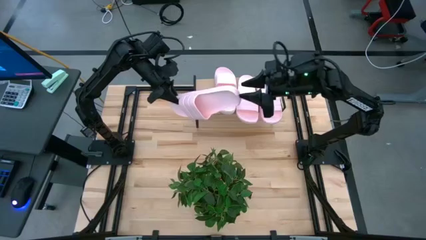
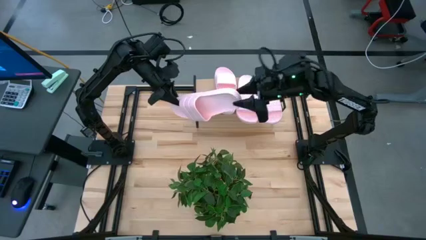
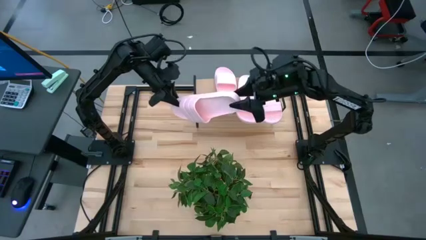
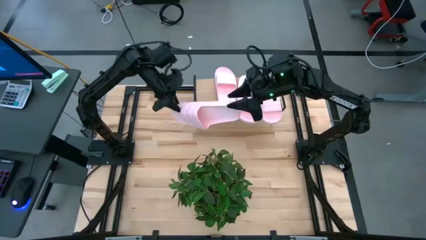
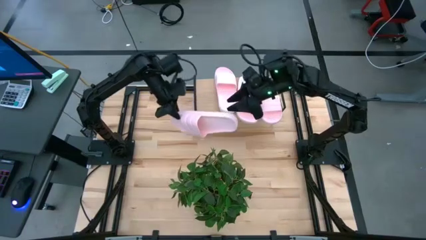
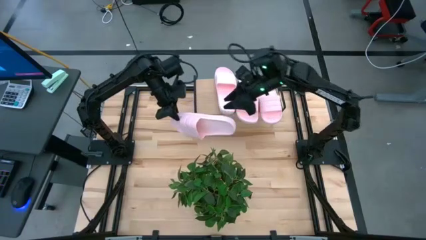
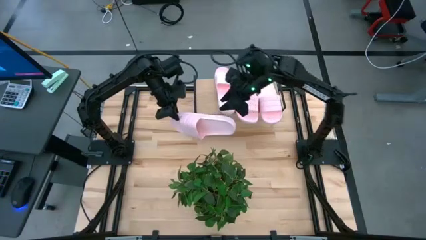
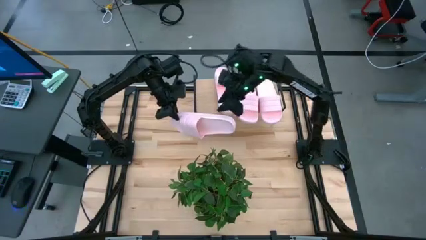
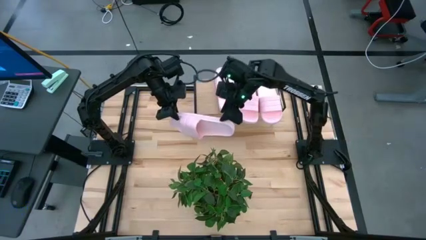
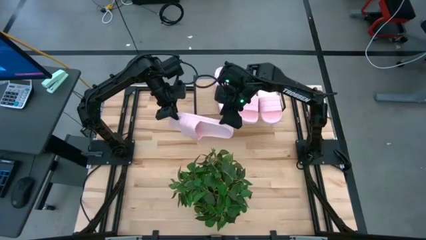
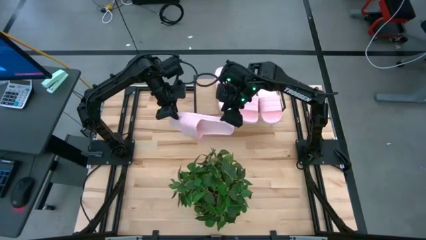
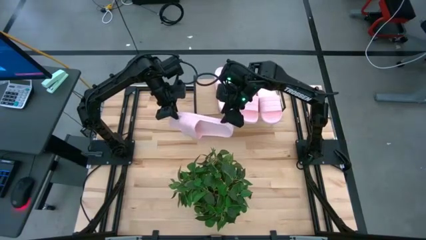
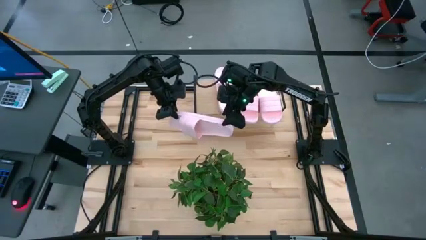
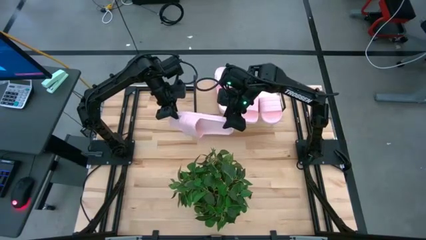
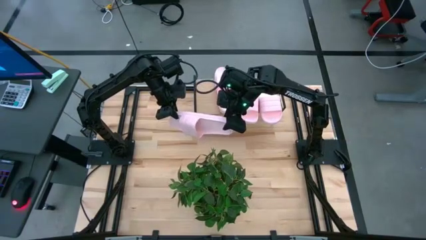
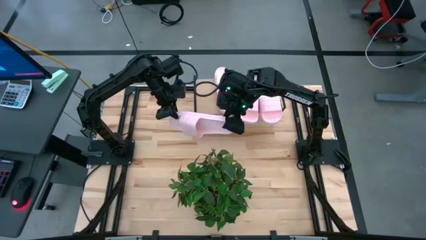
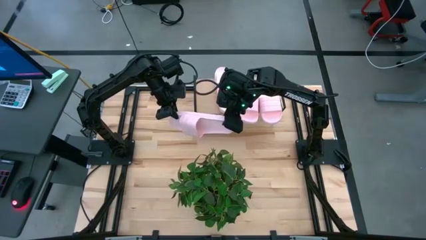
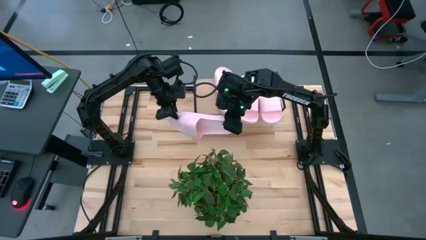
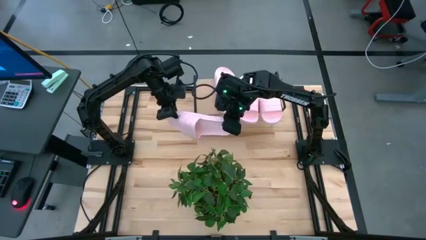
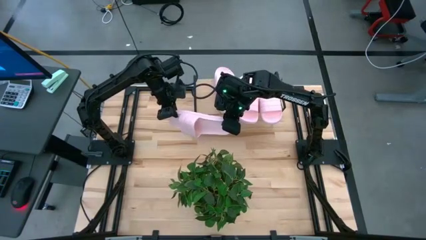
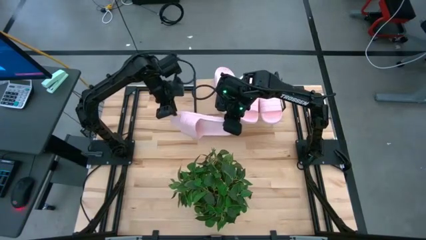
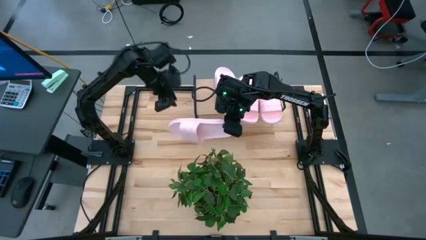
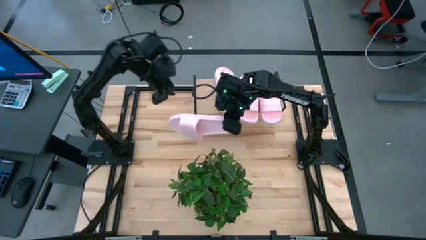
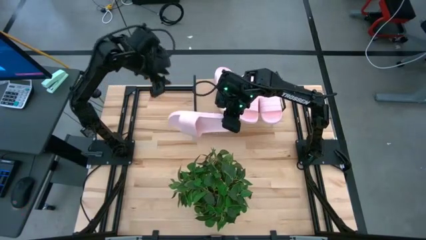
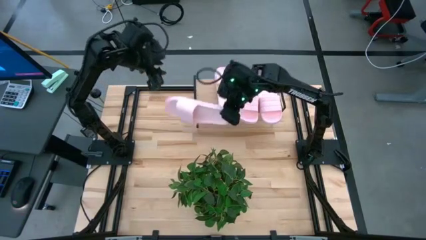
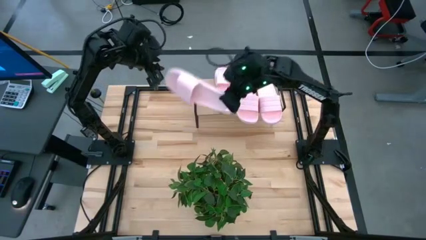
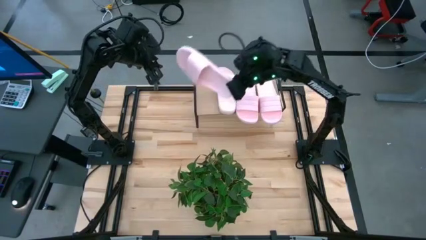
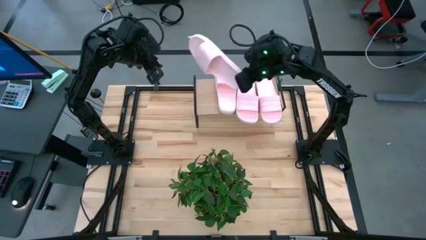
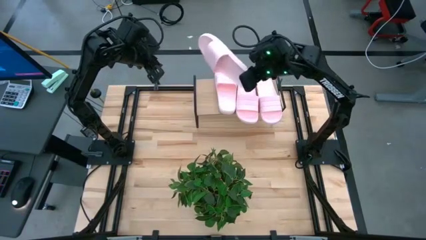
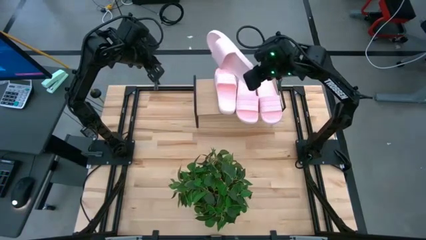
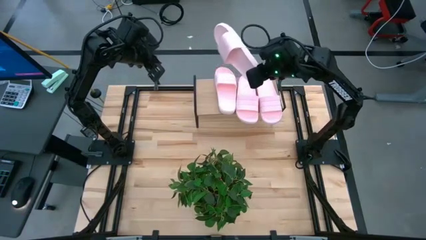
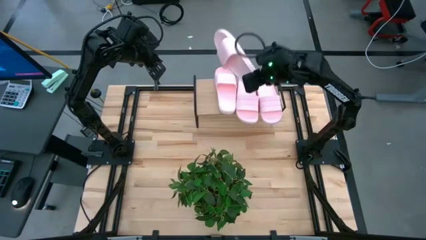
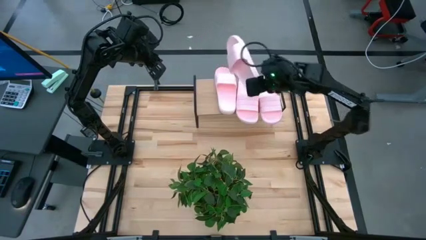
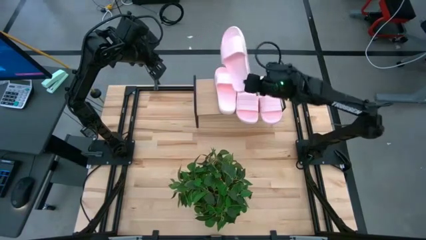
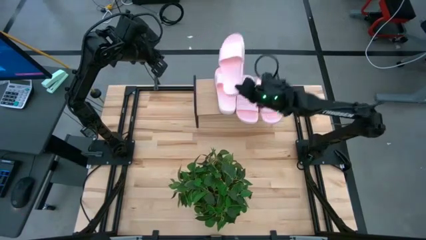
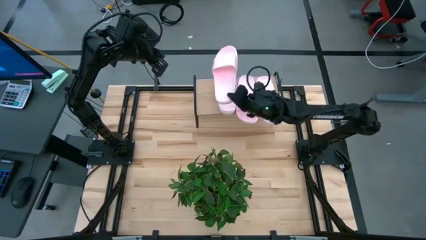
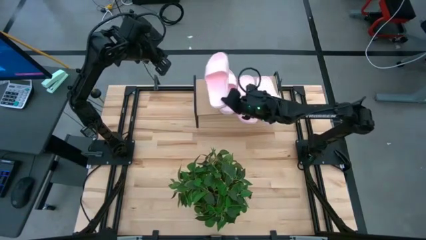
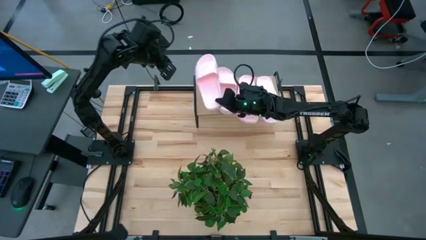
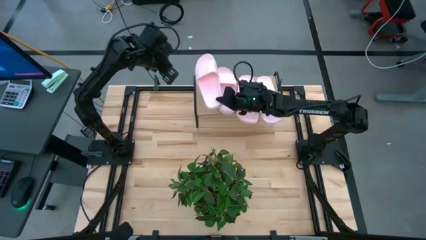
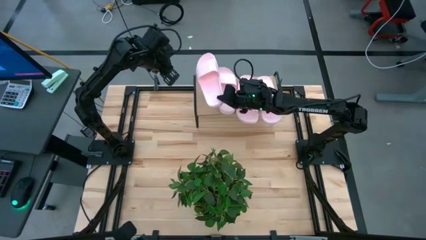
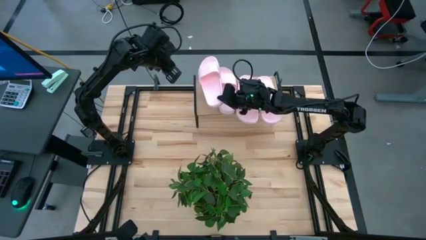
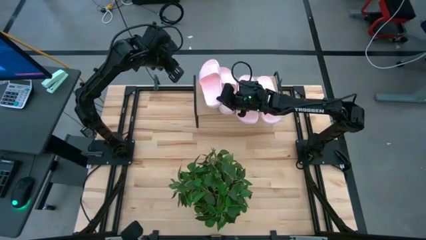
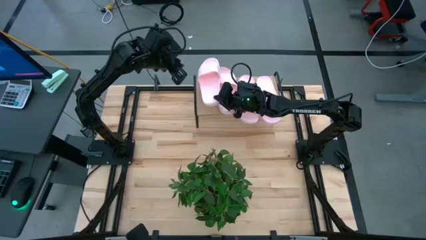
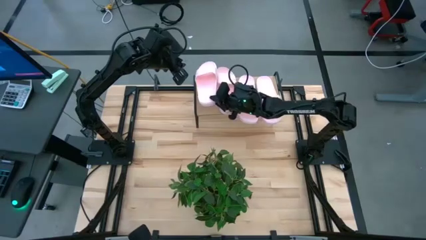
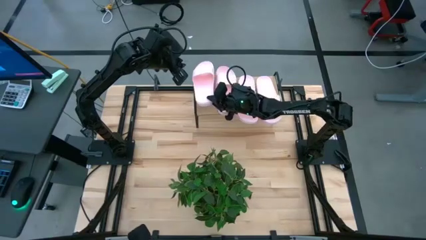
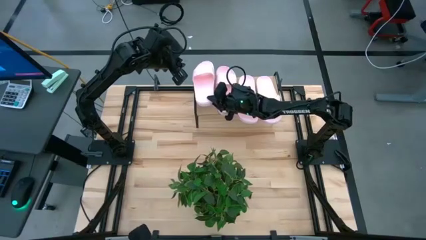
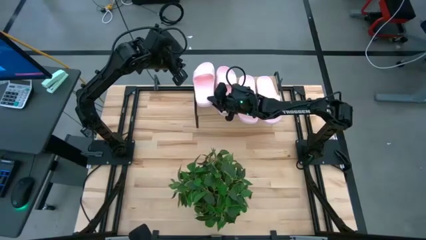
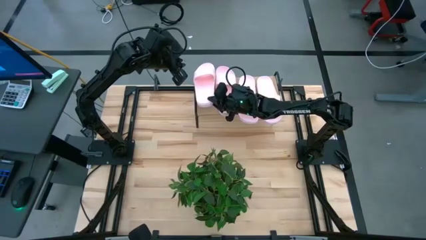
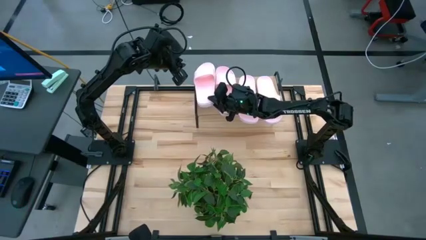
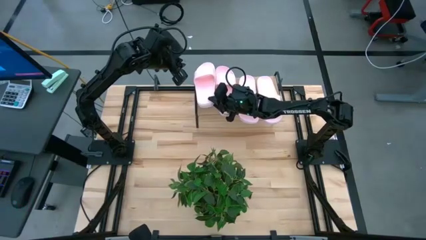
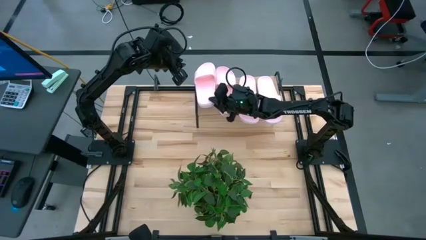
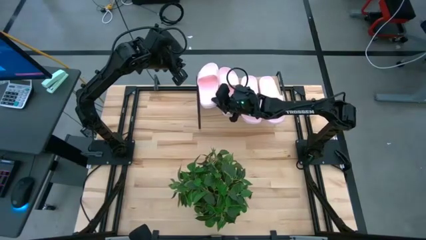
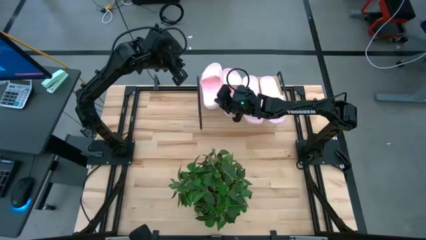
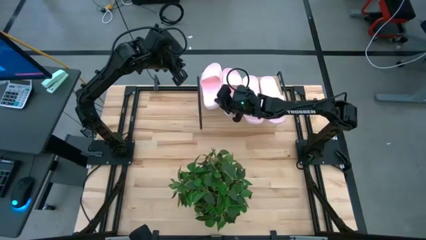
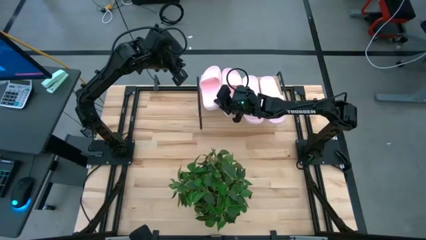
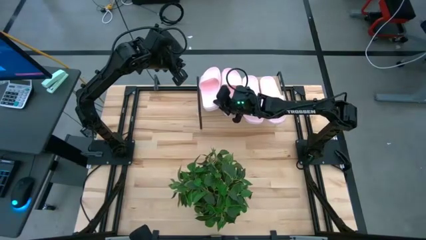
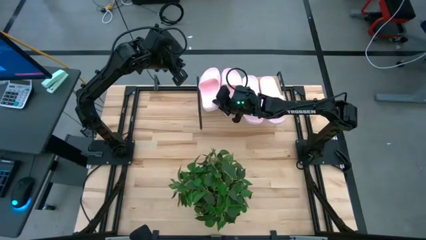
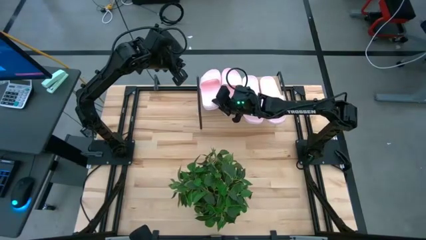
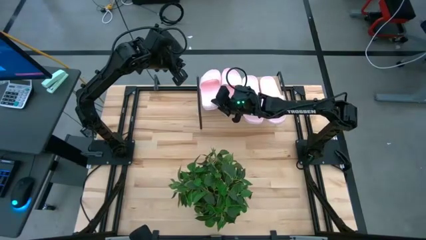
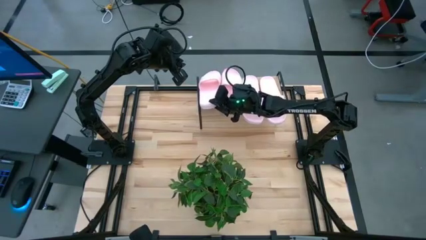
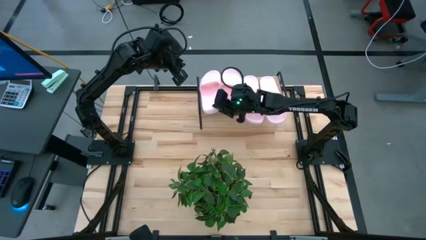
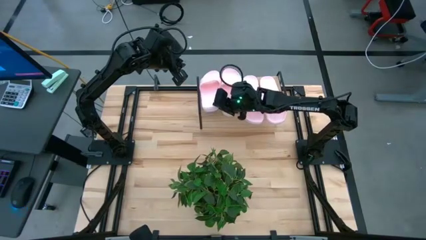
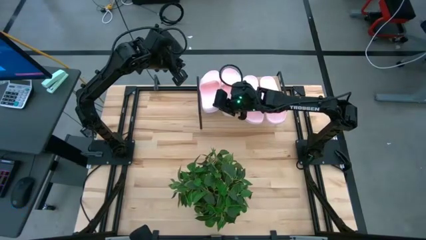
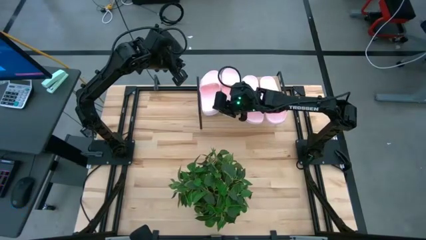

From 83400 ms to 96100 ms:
Task: Pick and place slides into the shelf
Put the slide on the shelf

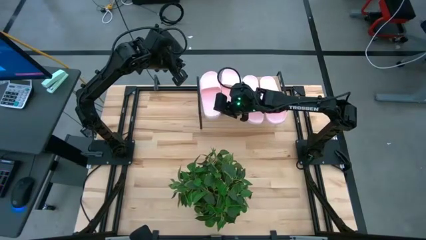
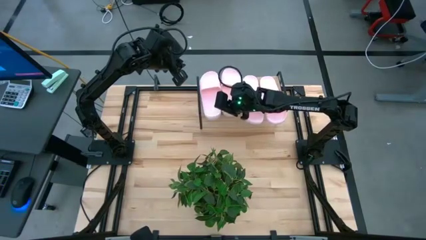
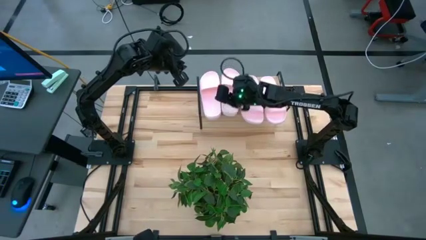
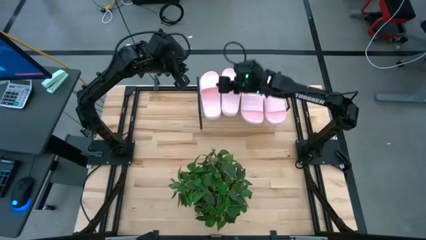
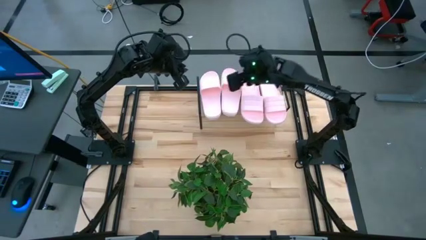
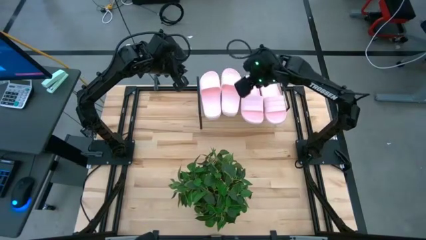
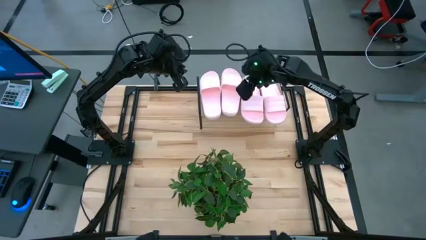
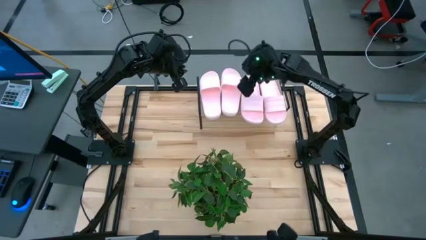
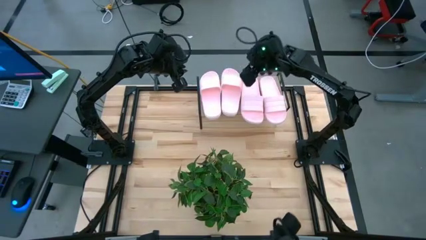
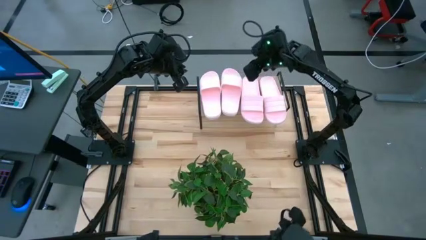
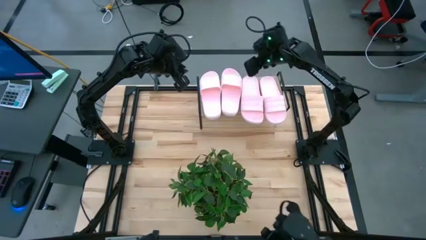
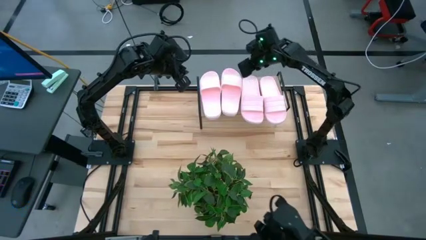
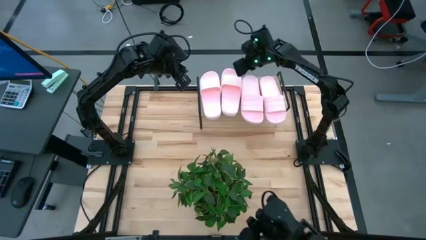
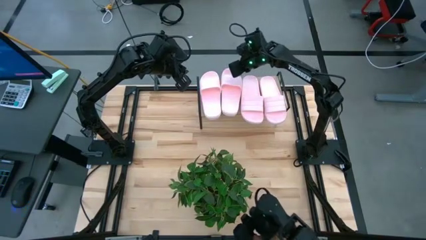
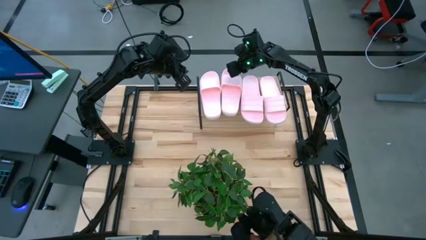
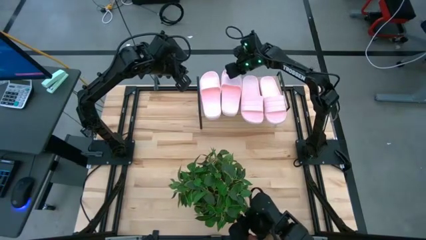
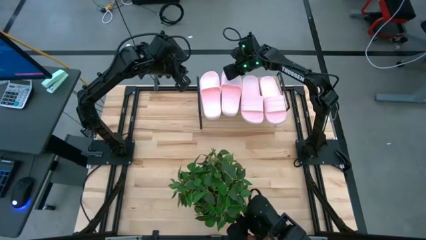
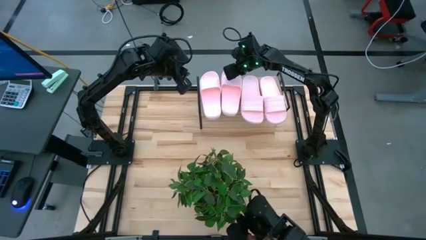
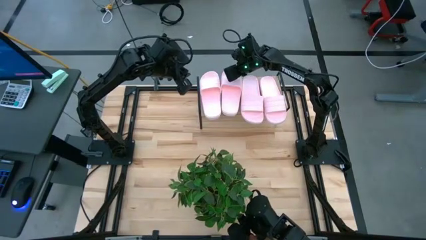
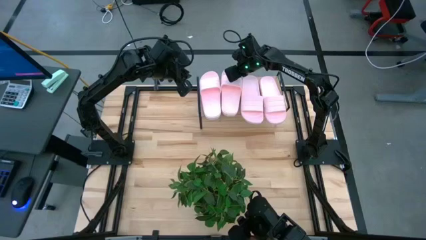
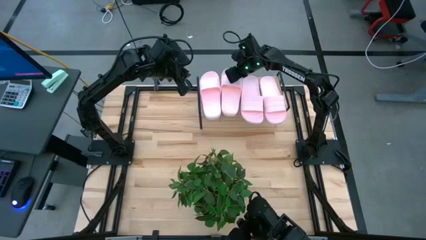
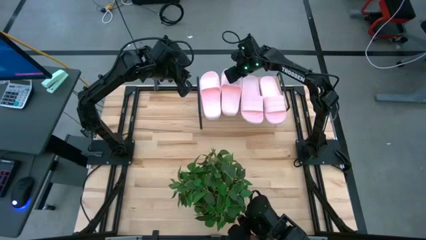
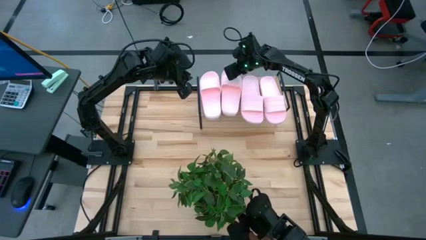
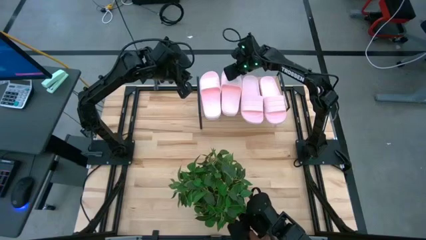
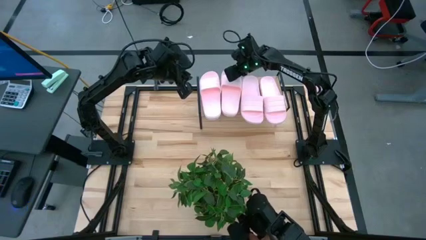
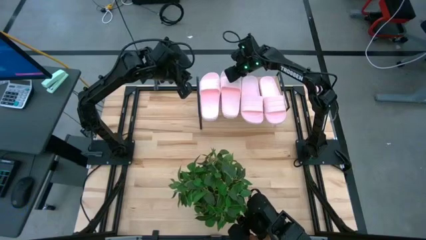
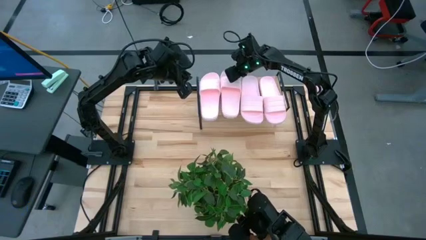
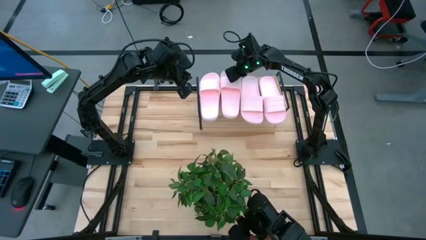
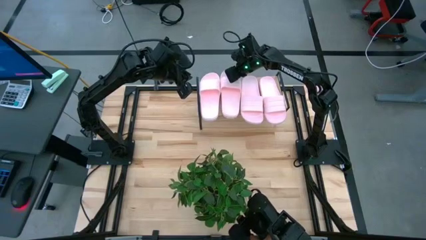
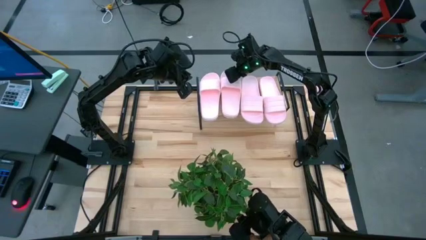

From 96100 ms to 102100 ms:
Adjust the slide on the shelf
